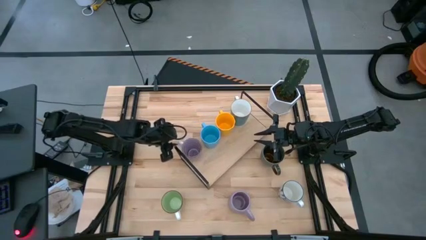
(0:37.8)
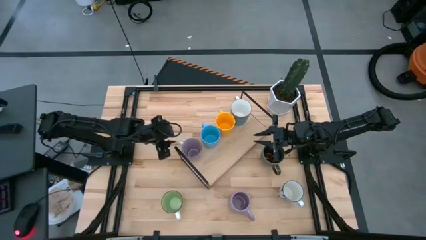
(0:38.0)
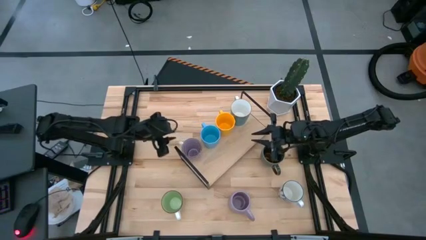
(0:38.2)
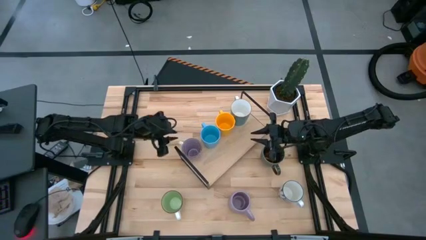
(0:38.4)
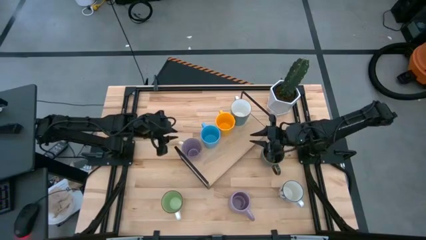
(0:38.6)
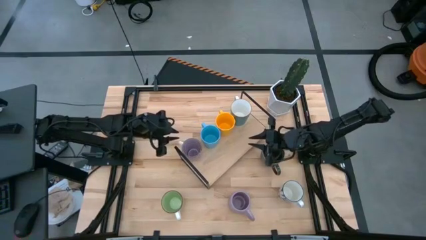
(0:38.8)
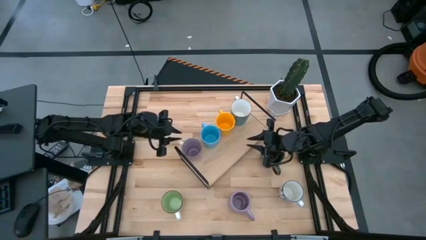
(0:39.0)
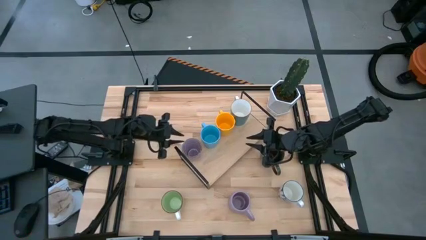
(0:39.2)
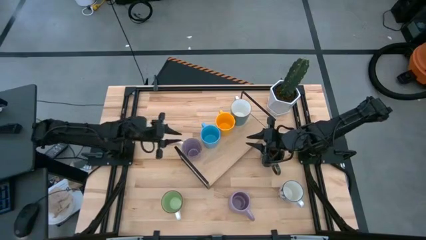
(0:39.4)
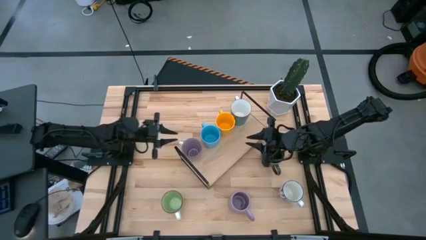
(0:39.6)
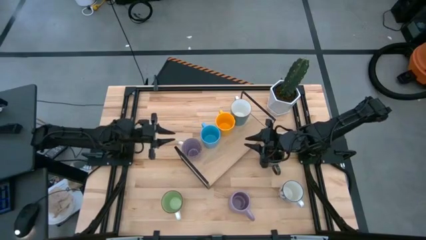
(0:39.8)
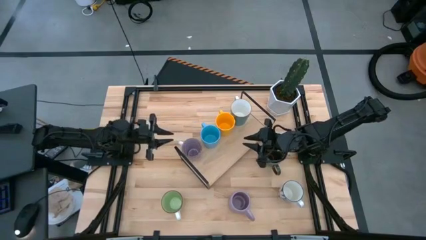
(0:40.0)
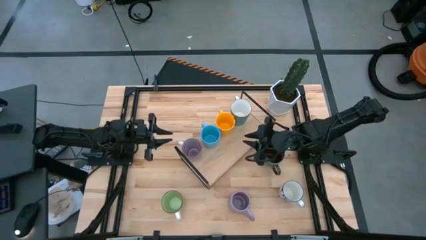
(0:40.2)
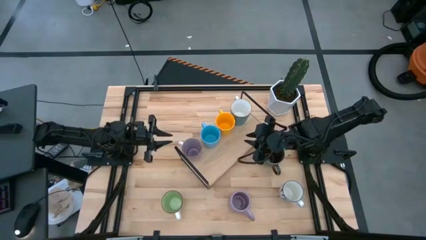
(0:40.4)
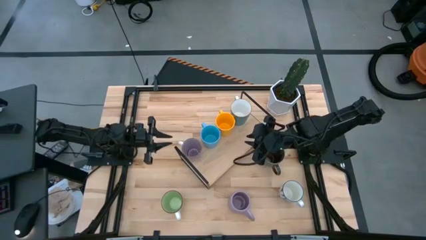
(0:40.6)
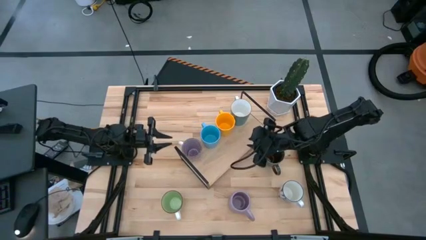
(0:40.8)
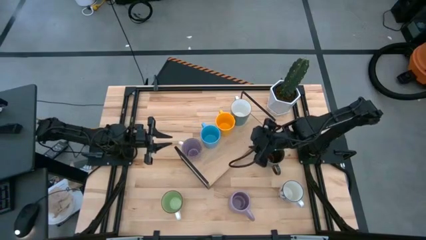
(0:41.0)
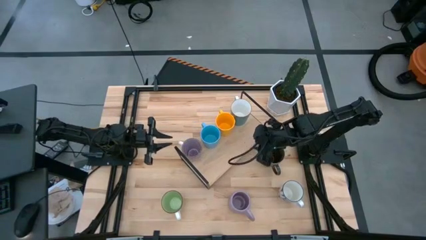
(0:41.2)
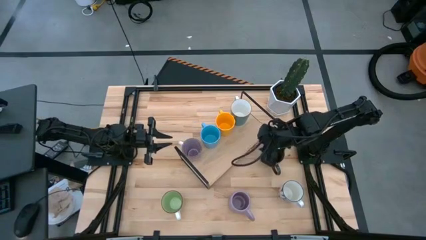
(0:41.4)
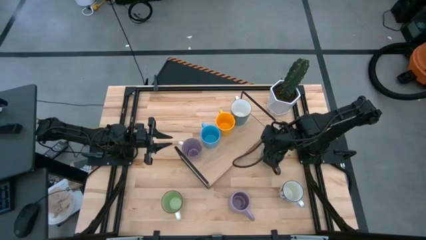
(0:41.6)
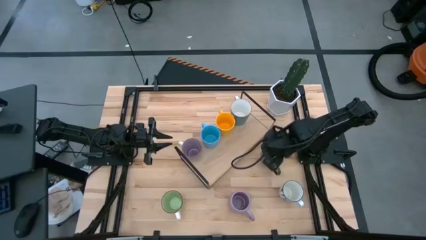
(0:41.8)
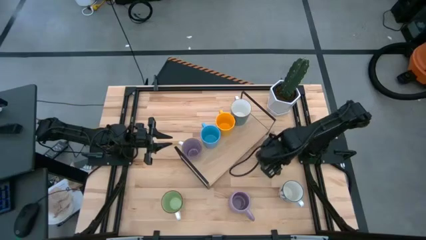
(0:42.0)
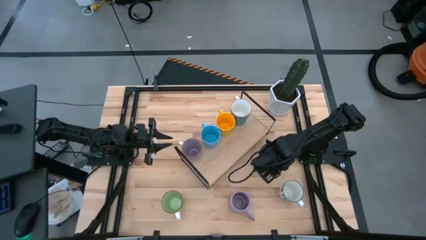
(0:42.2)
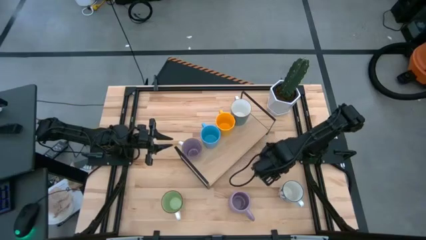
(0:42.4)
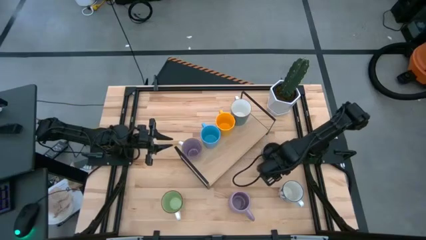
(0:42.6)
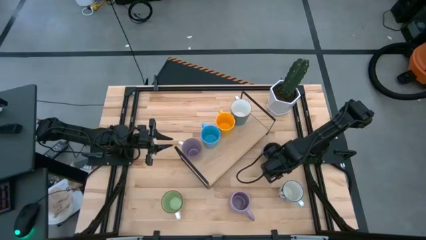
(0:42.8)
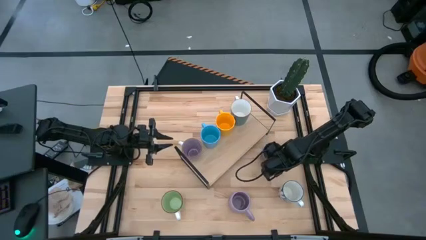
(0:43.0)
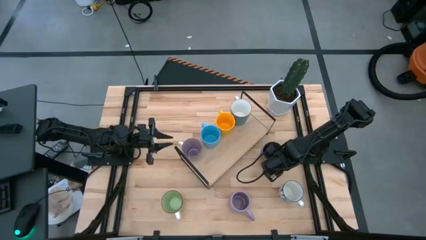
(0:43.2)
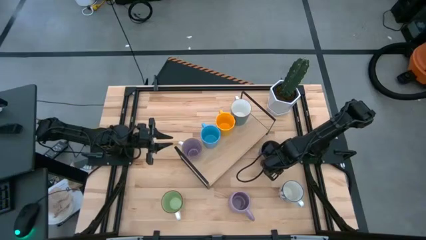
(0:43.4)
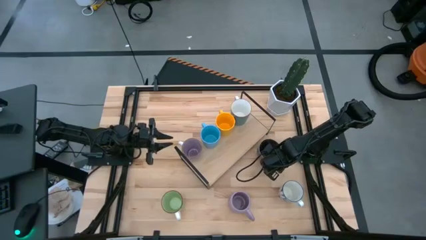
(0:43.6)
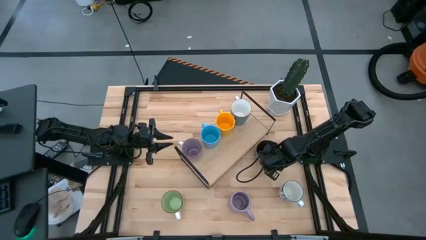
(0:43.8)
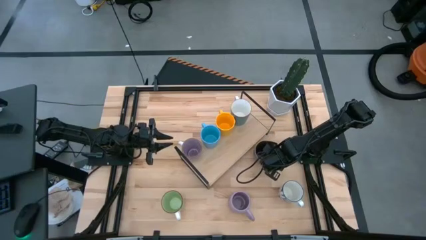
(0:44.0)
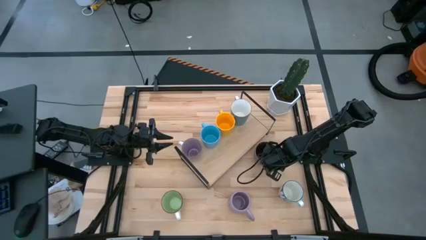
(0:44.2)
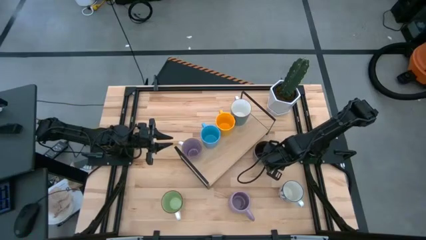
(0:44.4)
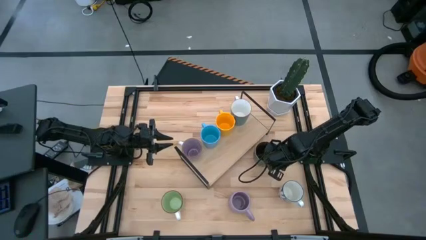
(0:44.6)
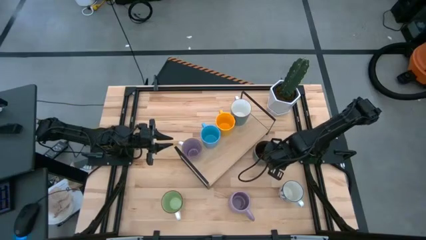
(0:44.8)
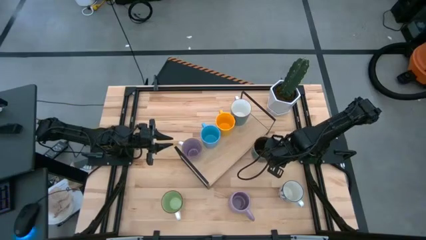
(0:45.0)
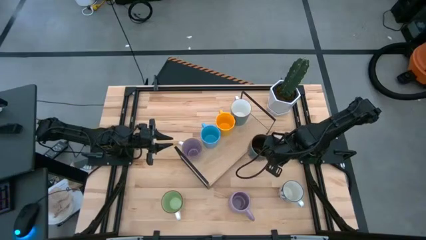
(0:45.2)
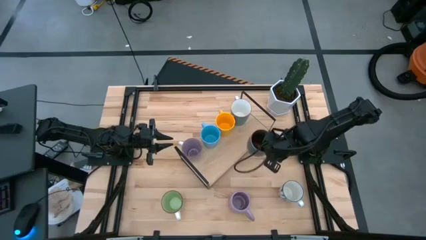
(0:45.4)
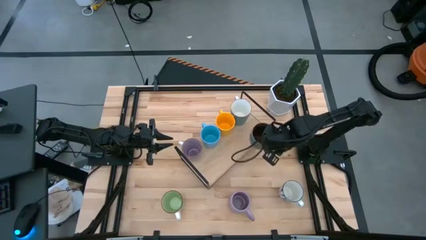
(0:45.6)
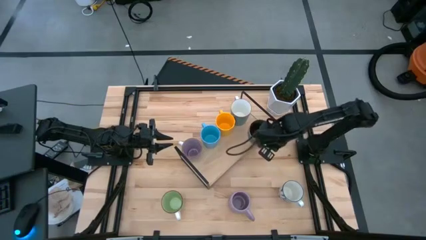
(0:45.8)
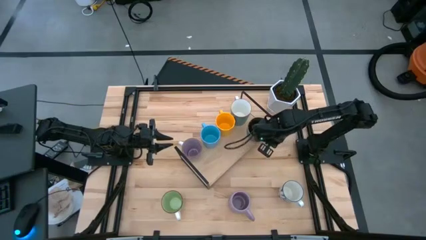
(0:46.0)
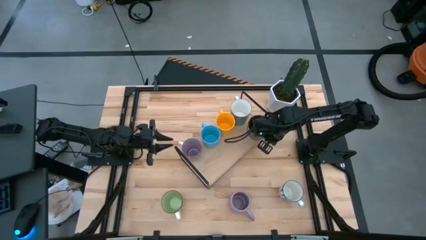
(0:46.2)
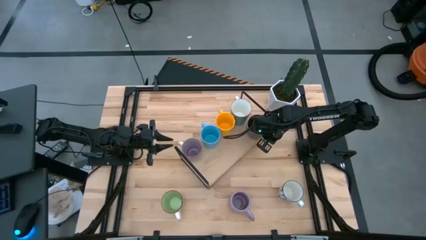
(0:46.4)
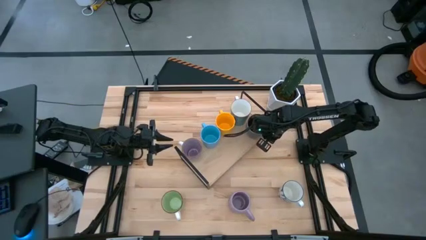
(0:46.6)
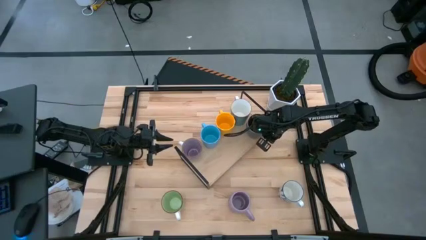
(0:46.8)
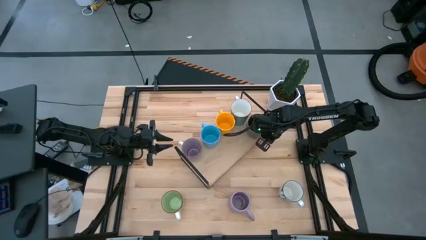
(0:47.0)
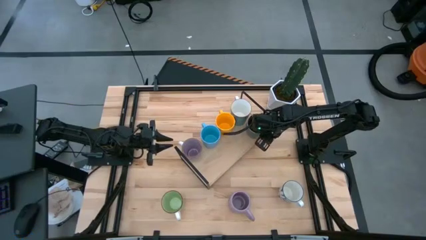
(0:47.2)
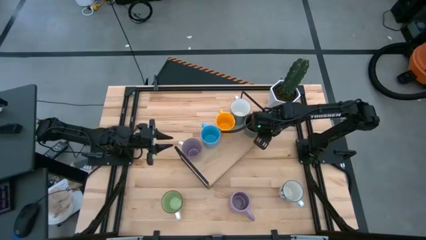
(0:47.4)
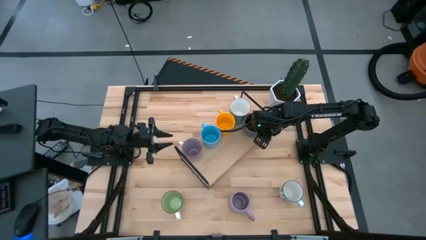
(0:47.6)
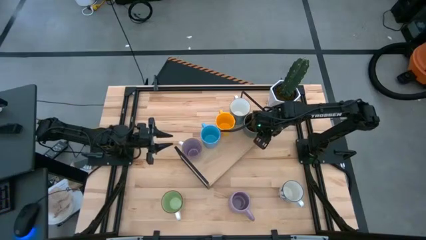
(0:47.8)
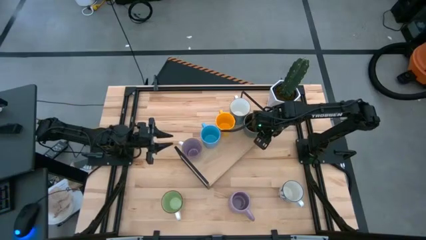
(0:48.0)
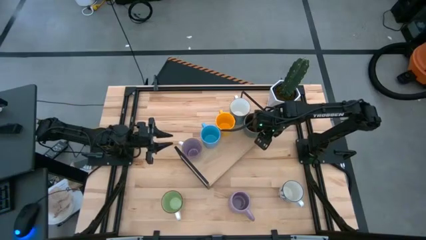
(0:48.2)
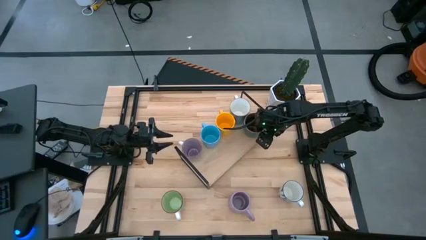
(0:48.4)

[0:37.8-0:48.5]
Task: Place coffee mugs
Put the blue brown mug on the shelf

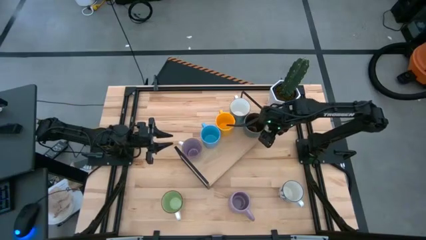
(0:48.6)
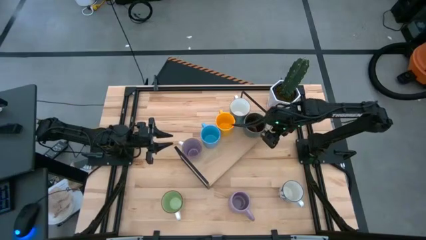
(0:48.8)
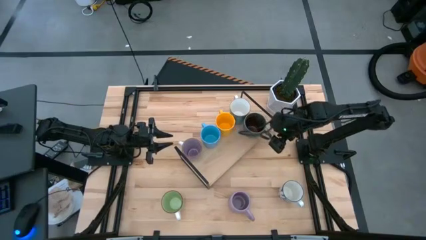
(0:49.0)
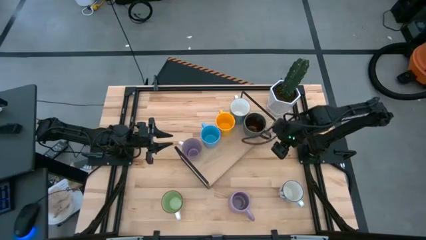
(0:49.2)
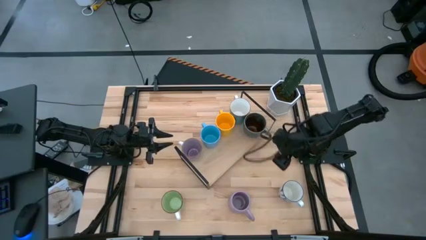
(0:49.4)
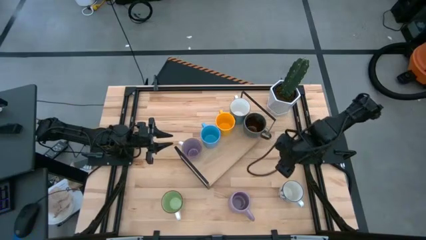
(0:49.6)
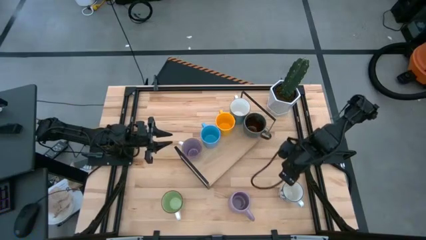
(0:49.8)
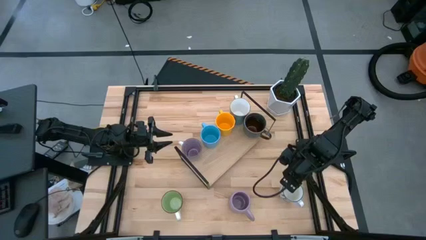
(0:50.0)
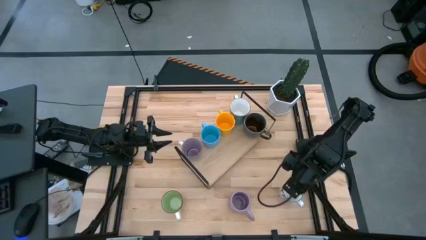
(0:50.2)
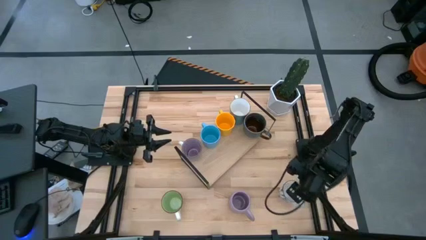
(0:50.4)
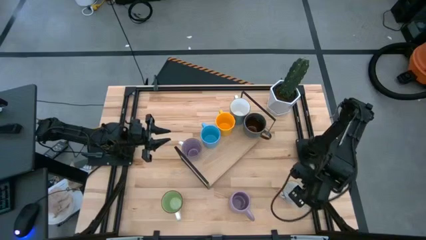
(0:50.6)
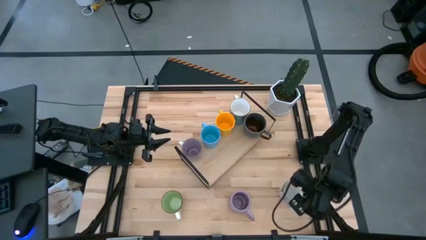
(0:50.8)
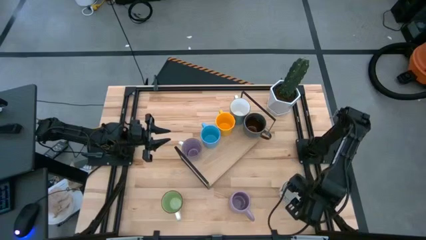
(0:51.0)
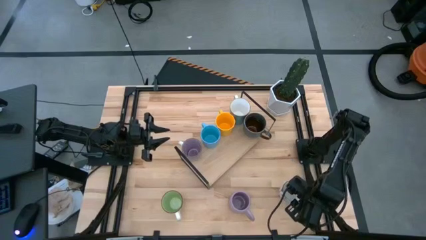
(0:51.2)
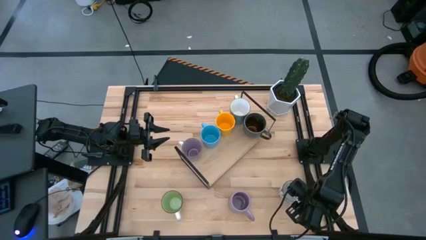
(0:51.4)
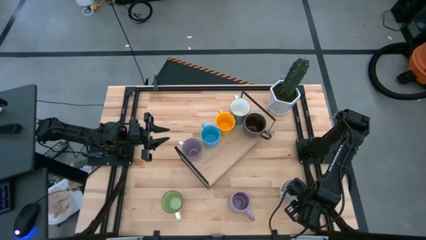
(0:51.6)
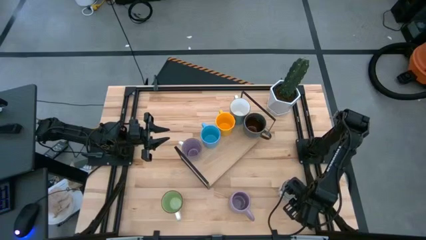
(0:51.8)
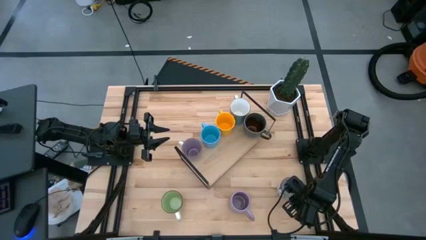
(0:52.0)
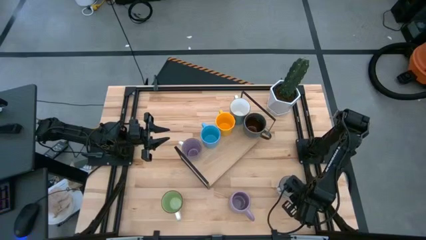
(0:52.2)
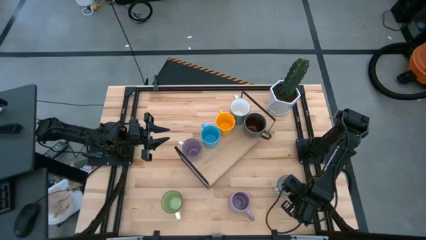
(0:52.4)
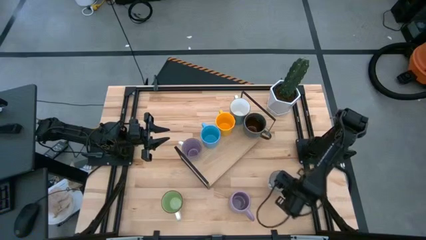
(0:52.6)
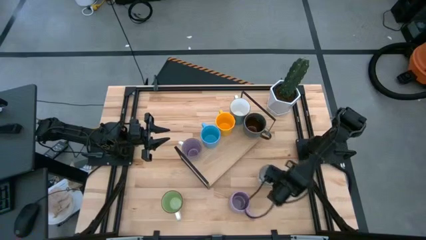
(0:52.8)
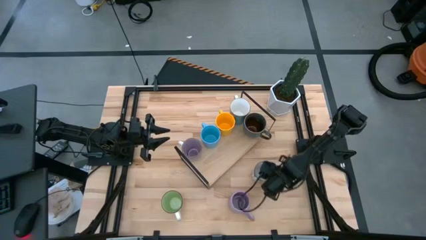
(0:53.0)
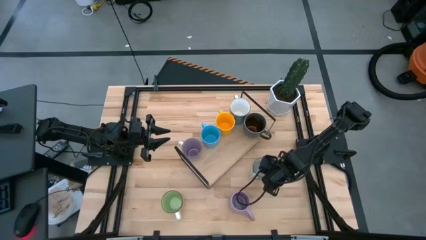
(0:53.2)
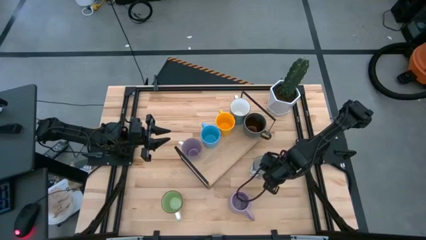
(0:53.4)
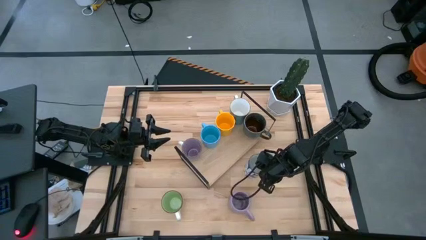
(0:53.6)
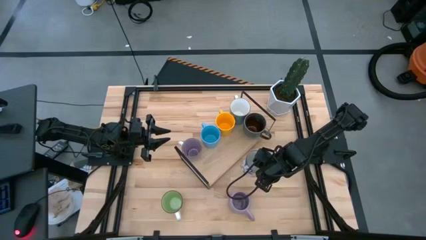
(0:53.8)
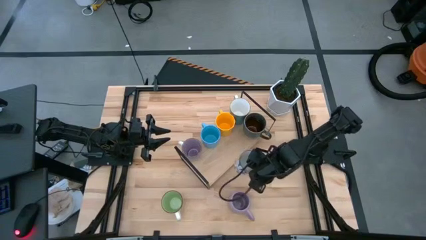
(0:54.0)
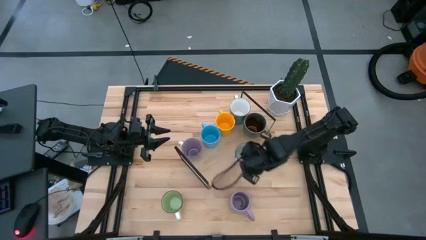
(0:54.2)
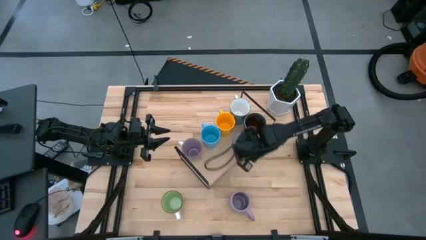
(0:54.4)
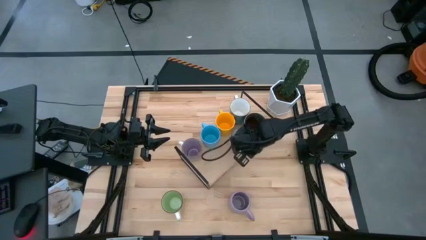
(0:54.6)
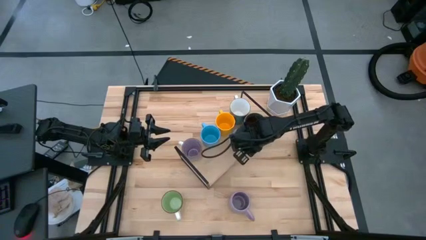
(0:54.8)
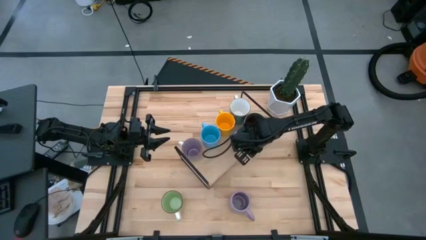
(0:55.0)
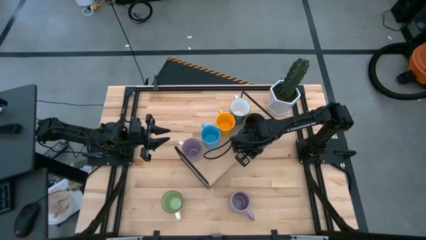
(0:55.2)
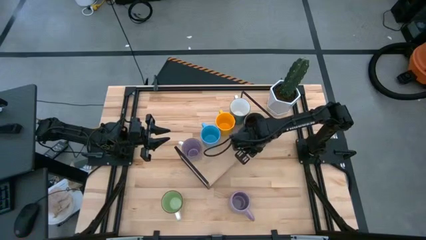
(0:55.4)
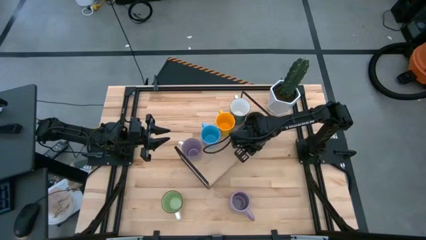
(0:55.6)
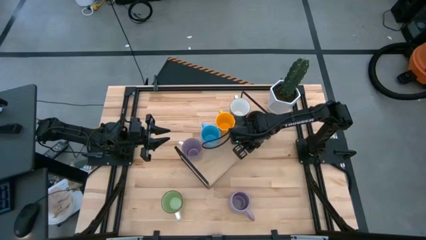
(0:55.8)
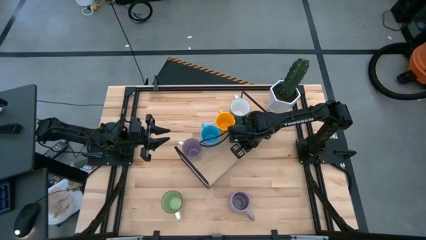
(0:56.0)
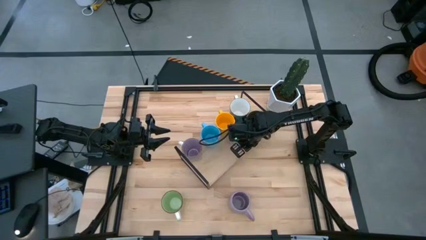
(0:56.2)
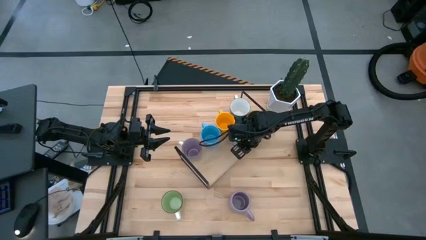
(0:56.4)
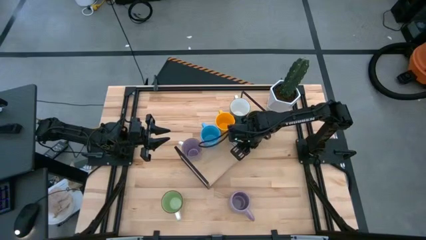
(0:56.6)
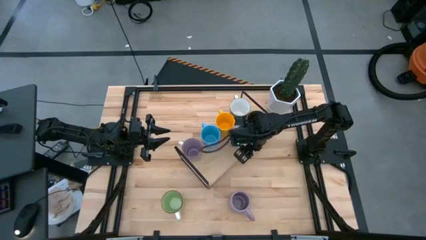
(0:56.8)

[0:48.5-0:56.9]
Put the blue patterned mug on the shelf
